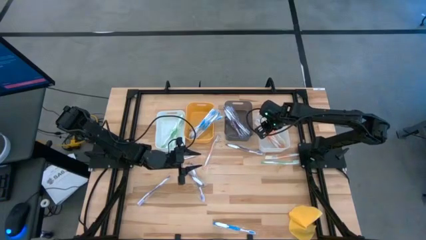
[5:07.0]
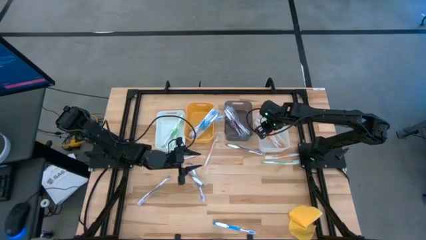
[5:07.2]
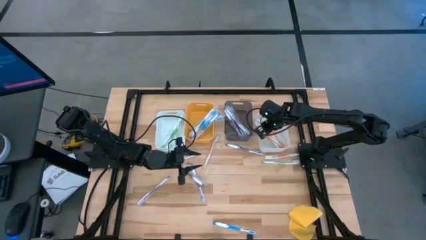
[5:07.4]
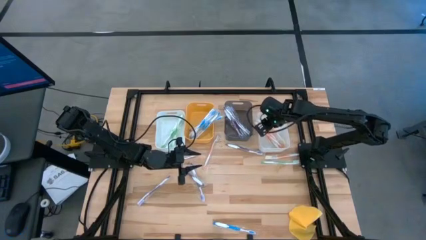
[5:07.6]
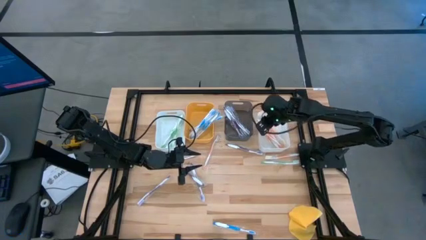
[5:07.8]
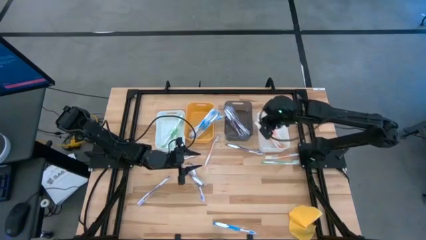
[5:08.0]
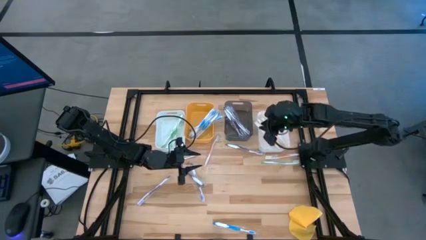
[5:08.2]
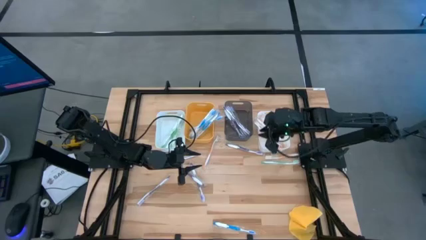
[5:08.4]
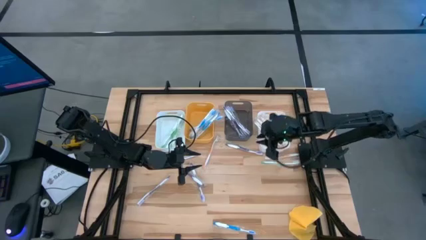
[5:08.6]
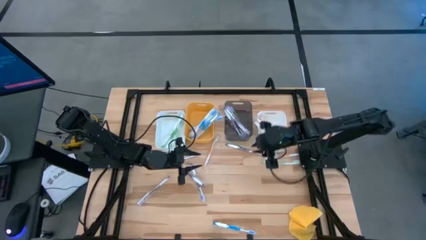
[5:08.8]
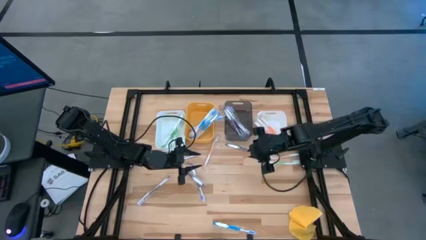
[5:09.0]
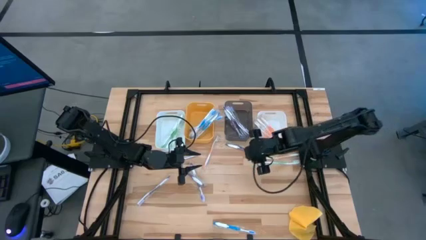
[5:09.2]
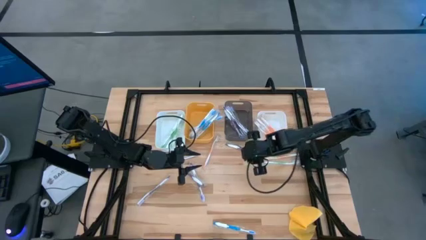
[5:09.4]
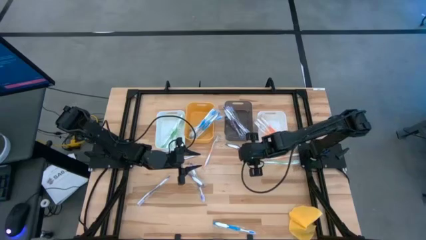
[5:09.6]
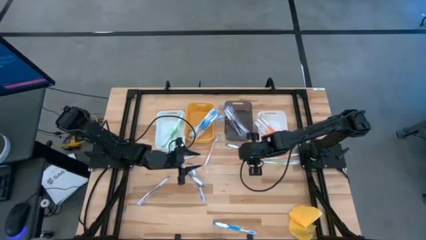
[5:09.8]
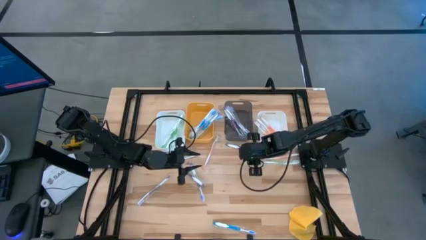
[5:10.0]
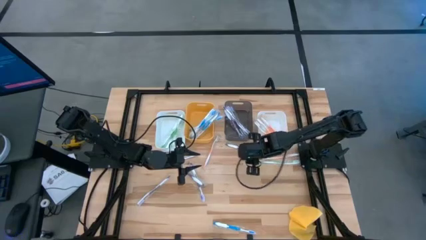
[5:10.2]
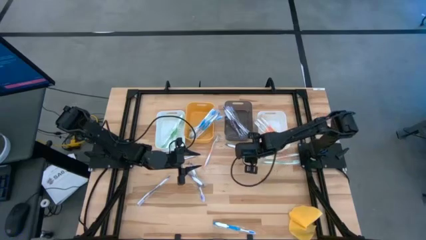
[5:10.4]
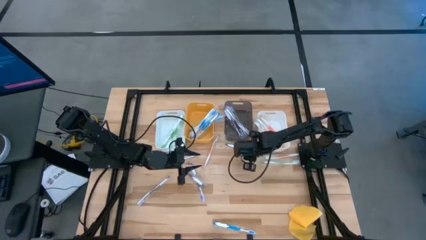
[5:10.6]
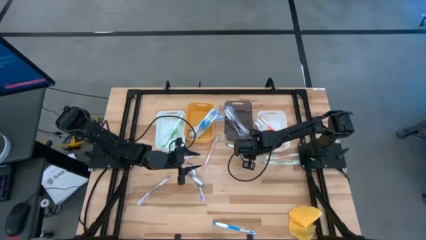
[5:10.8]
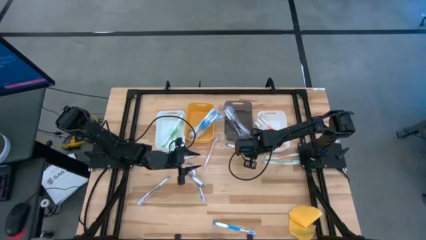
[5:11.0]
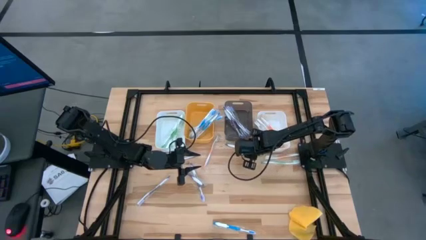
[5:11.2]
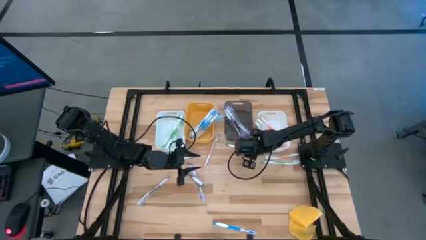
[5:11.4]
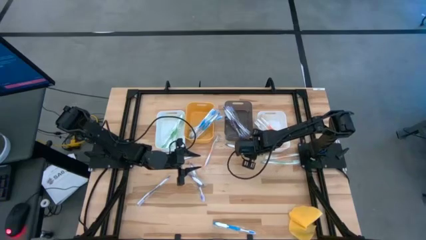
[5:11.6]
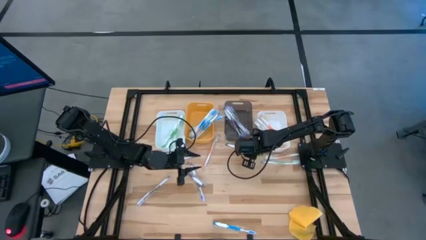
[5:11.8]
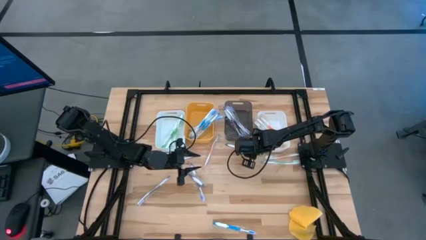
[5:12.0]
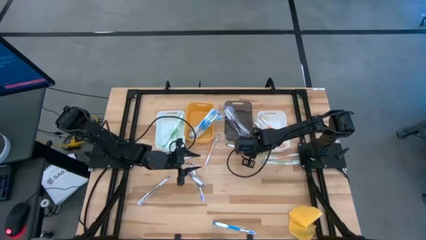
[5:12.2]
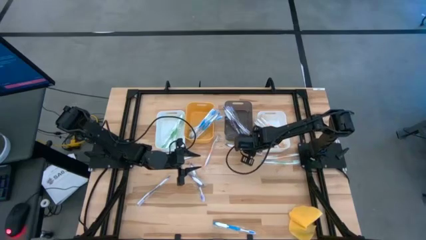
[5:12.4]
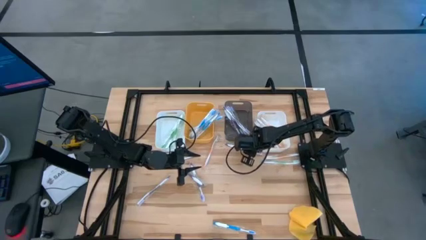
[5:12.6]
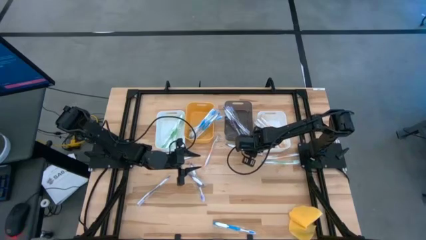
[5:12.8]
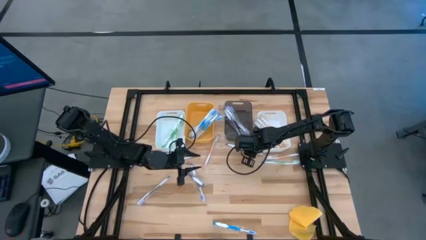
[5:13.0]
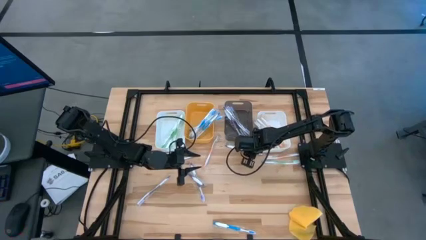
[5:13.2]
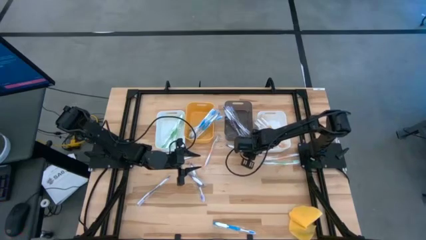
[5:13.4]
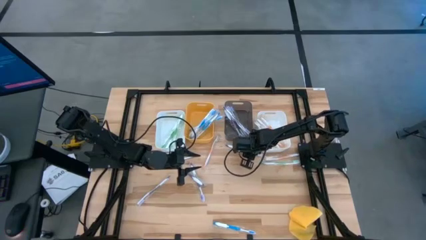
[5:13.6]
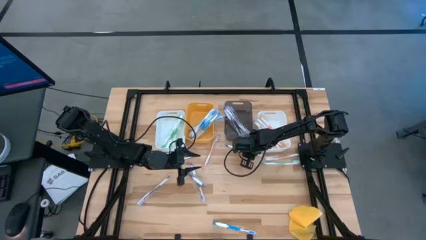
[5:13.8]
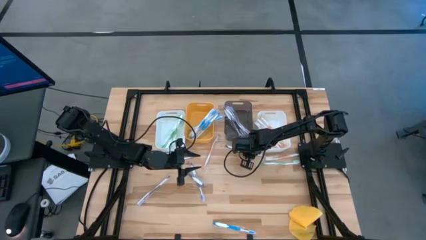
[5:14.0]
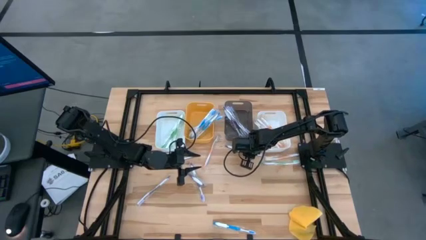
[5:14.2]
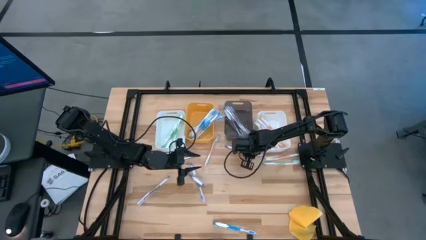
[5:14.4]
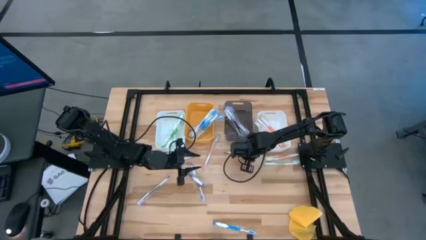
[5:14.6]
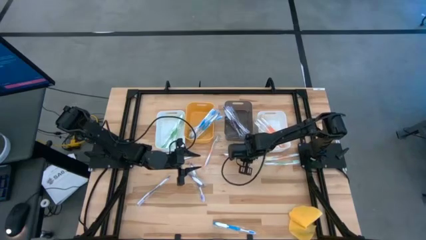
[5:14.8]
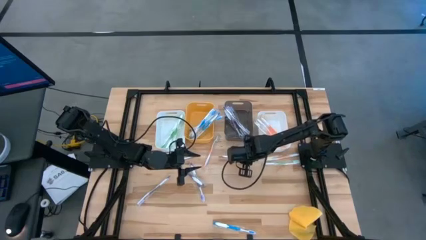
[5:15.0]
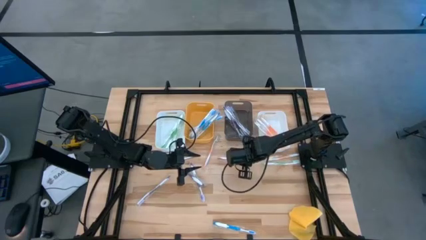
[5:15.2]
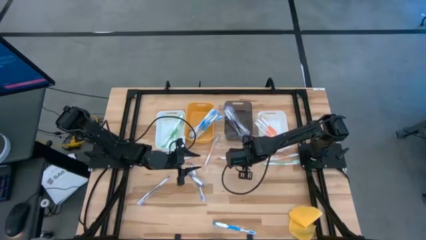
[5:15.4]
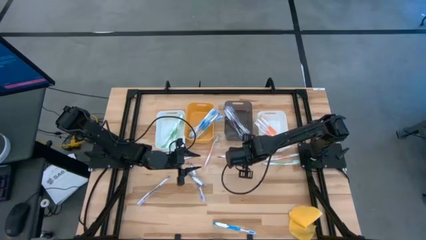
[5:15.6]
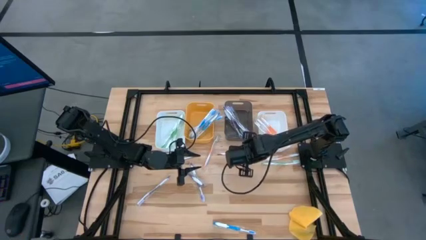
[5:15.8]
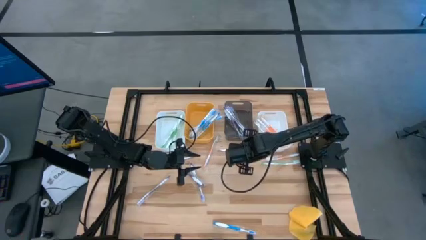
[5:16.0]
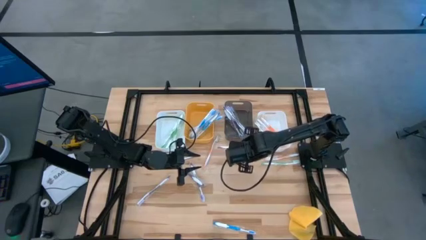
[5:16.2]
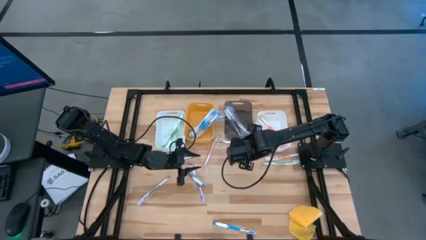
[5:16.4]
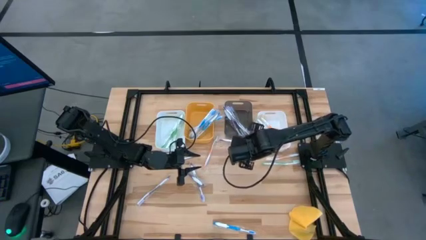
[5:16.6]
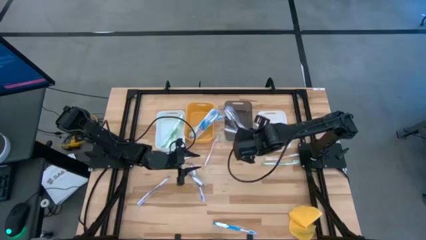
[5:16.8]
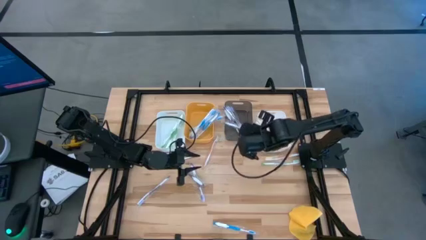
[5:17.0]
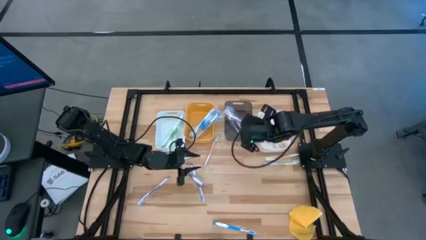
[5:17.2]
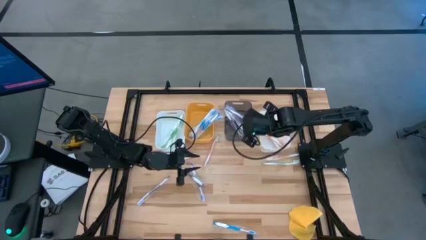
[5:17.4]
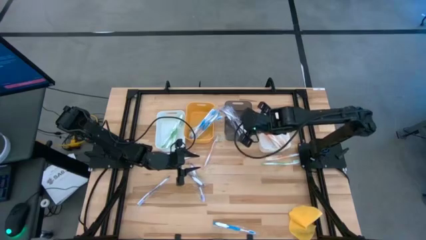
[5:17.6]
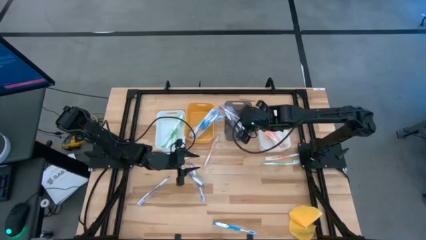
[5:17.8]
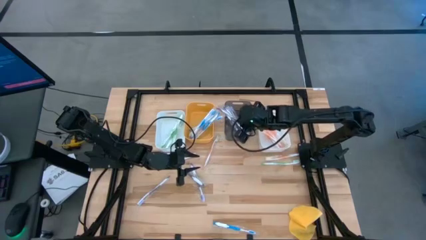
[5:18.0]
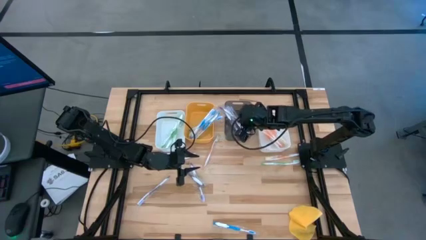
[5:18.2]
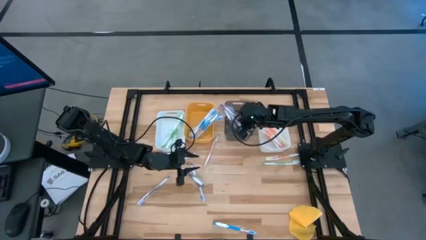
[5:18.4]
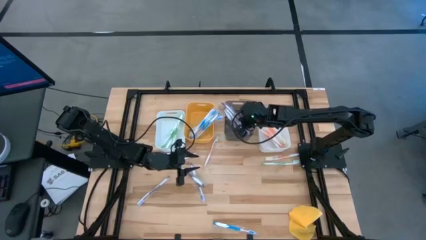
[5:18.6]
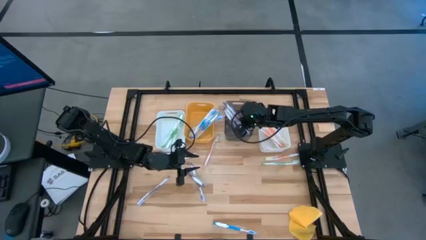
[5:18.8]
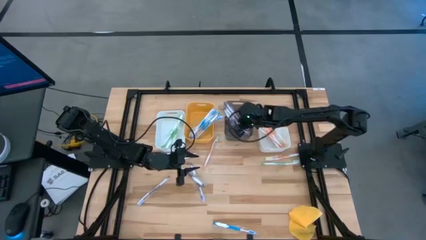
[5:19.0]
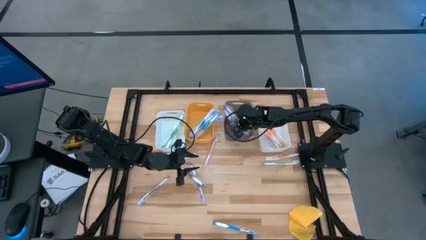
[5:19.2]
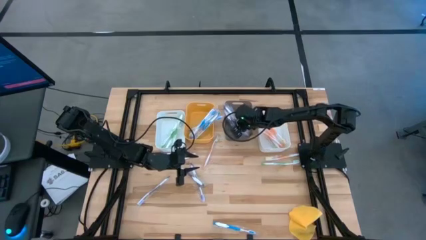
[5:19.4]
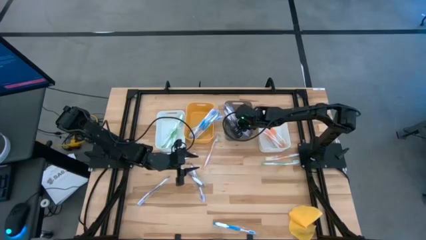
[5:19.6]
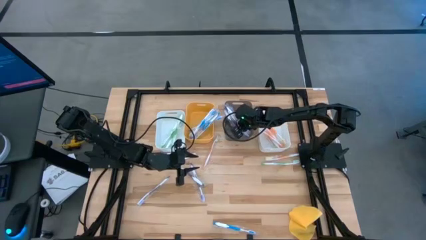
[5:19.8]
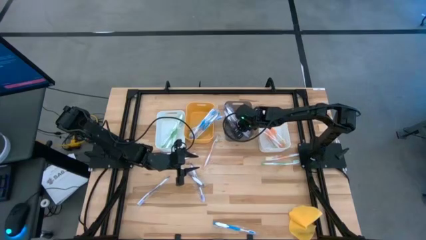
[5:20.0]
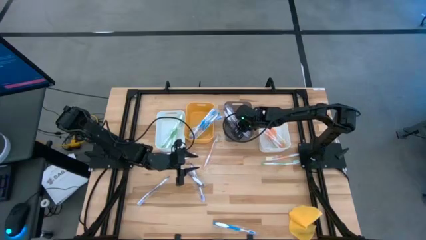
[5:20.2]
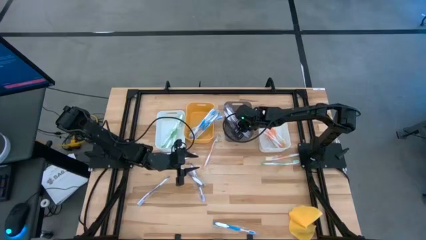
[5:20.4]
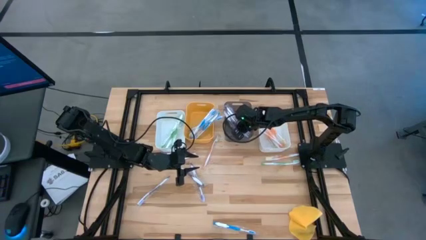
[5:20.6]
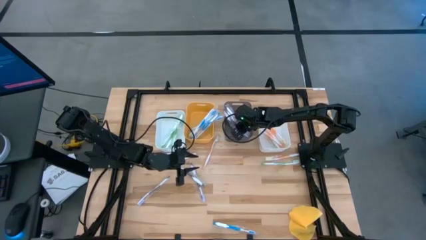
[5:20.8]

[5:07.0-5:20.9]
Task: Pick & Place Toothbrushes
Put the purple toothbrush into the black transparent bin
